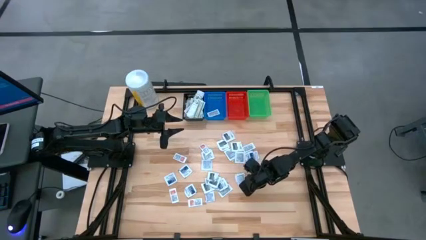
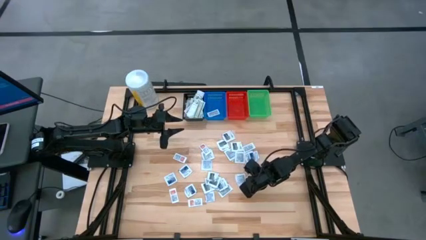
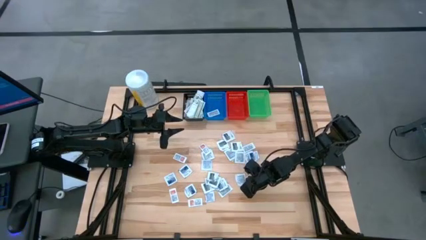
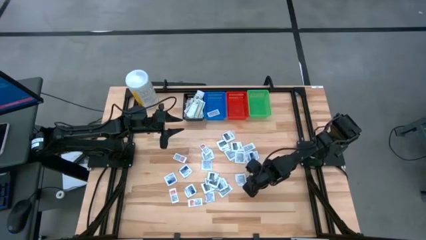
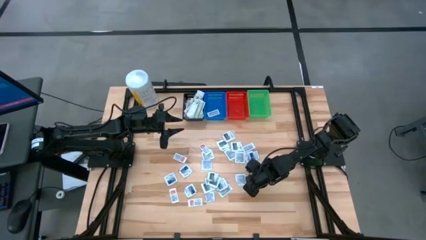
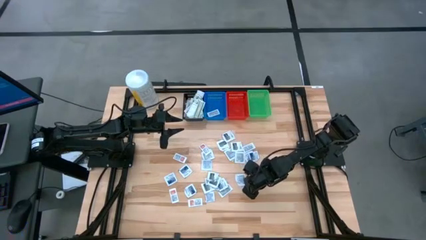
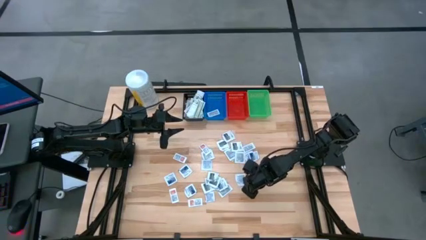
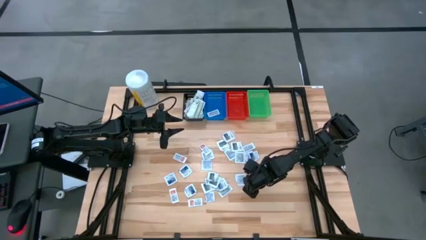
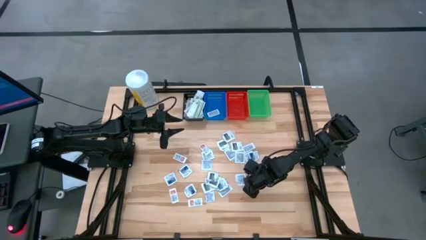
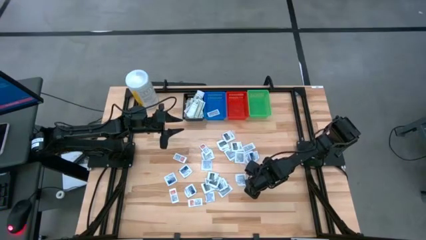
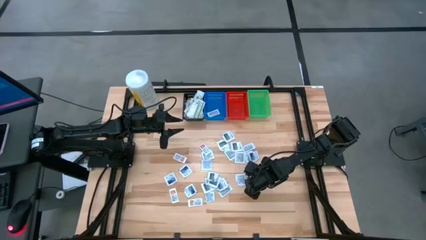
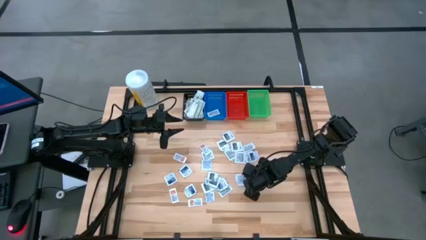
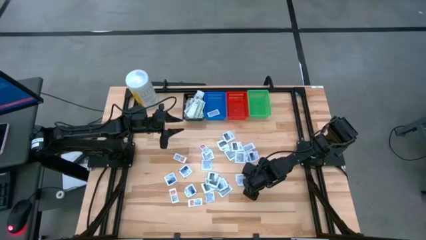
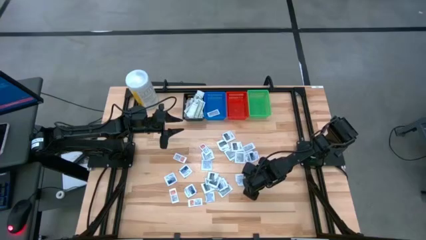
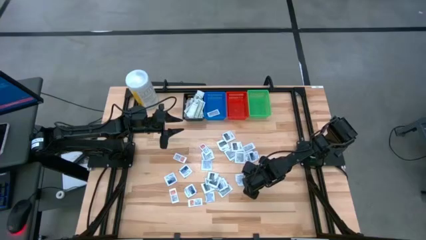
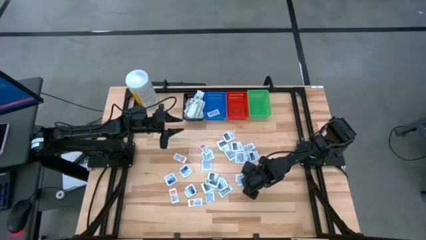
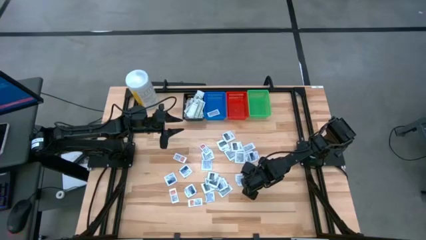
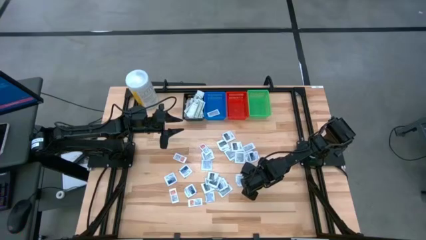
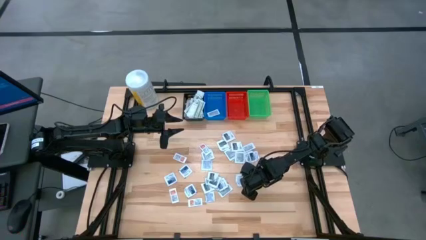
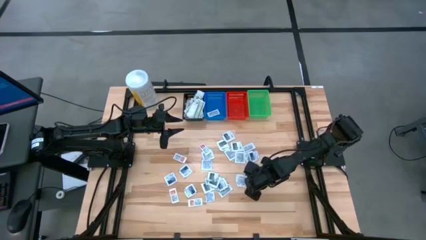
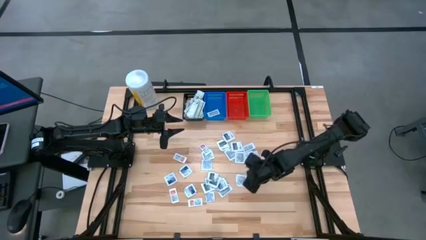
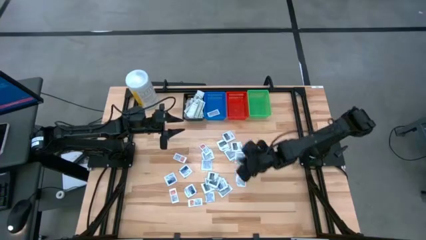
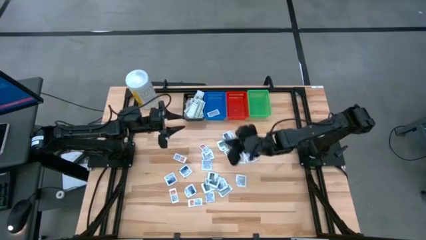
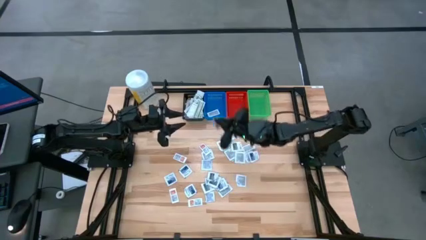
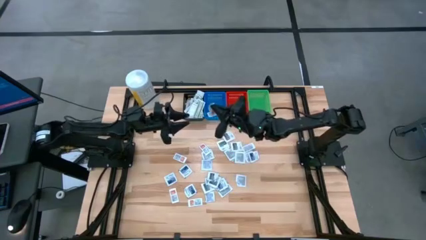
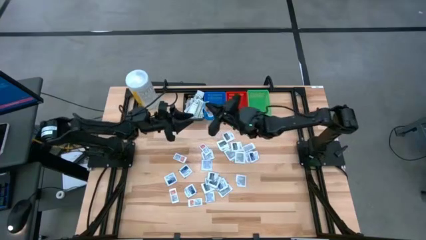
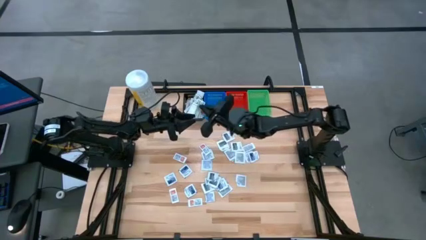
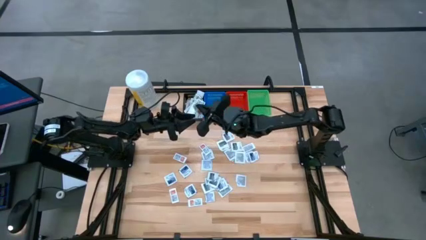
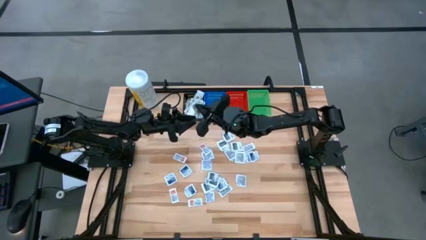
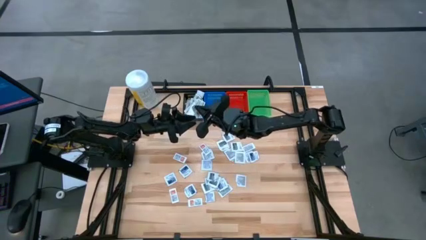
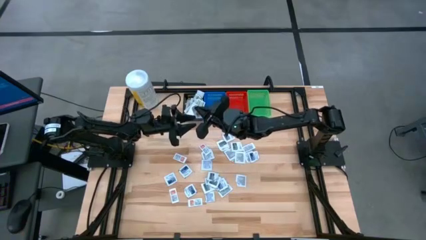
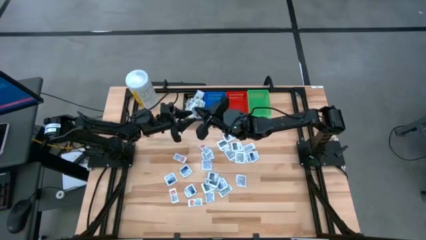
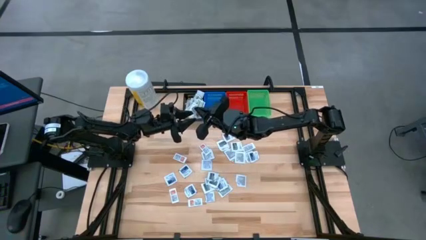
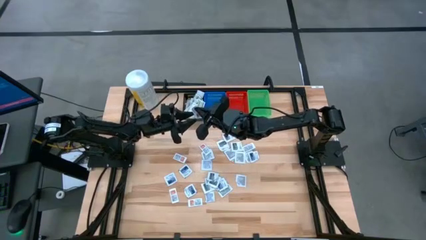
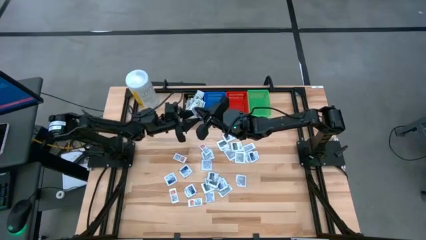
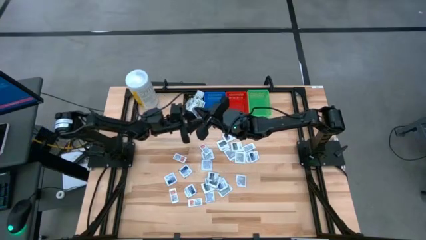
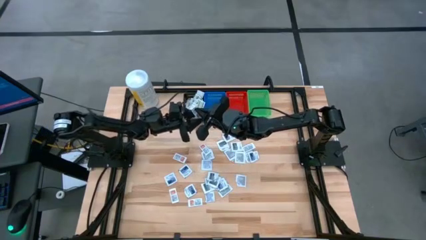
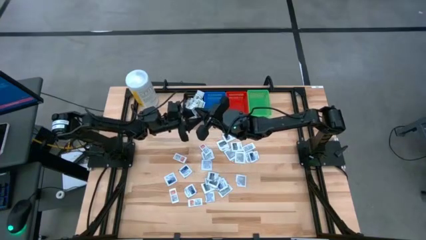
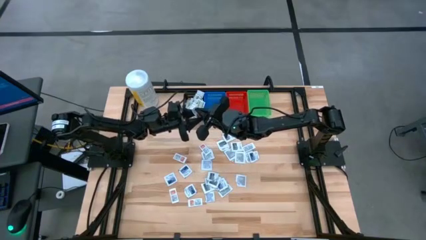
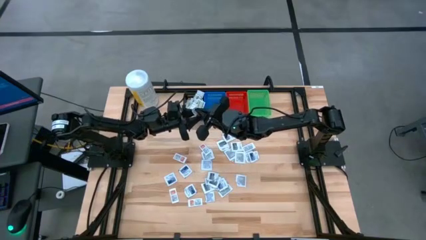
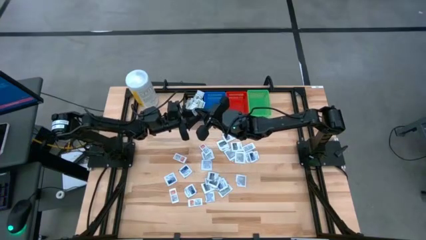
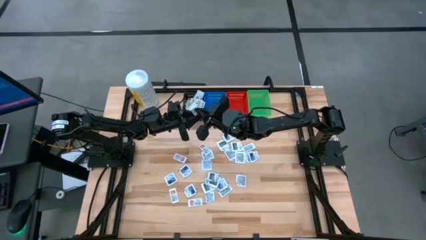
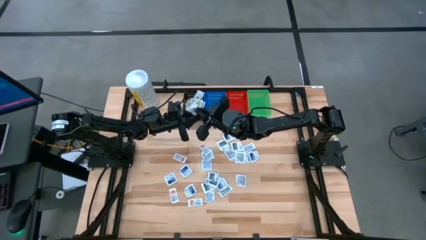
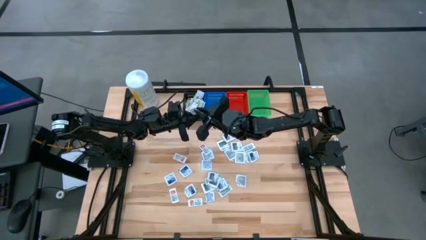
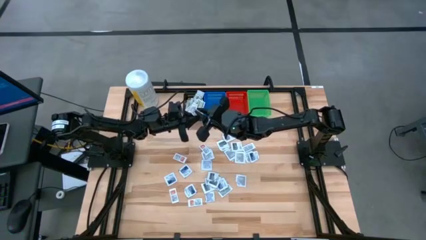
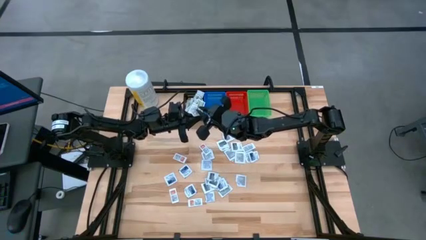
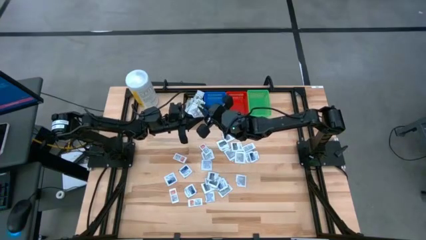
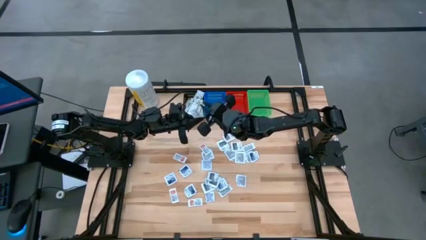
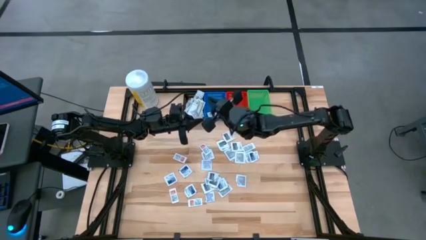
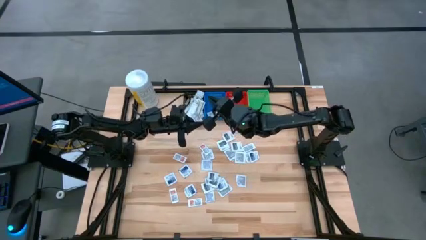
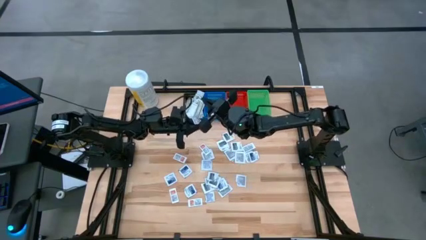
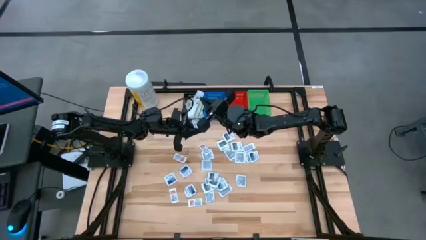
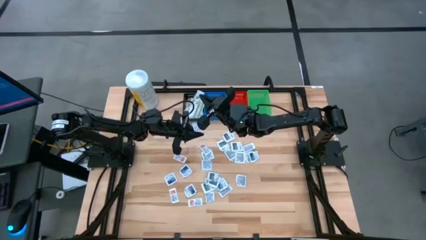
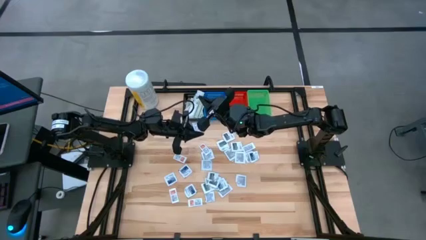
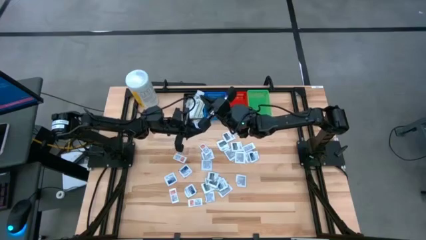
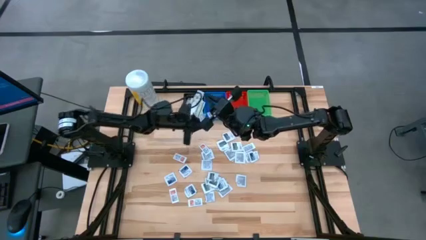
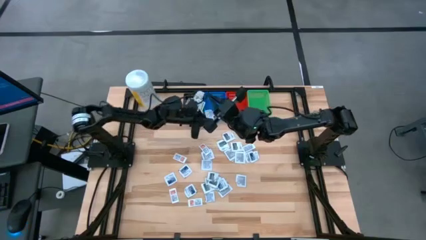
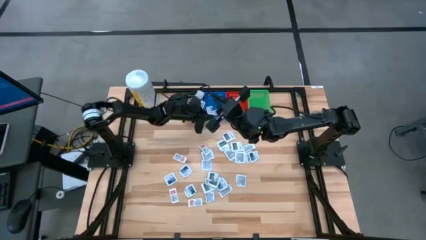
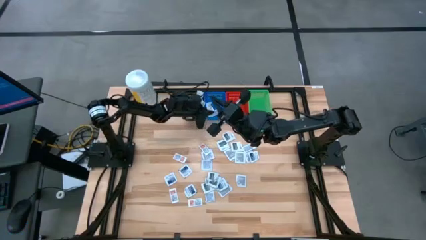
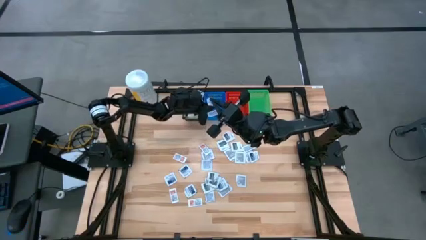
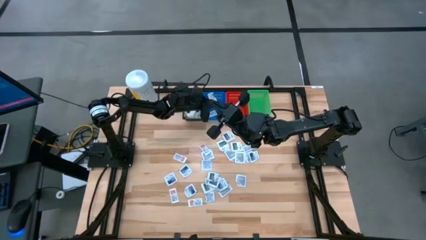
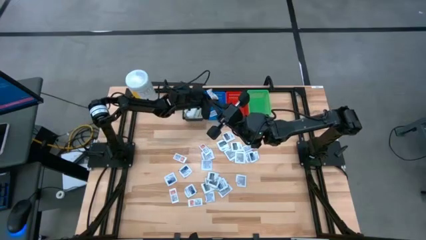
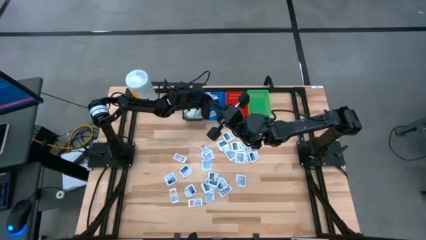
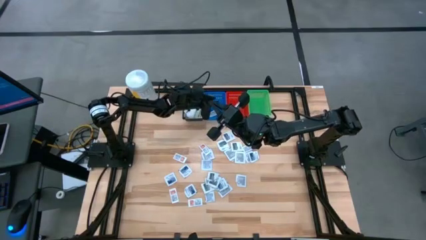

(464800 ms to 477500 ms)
Task: Pick & Place First Aid Supplies
Put the orange ointment pack in the blue bin

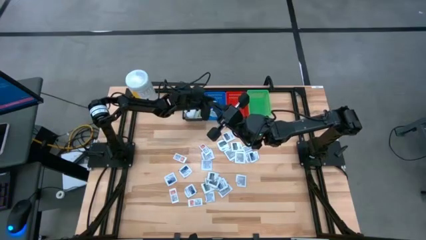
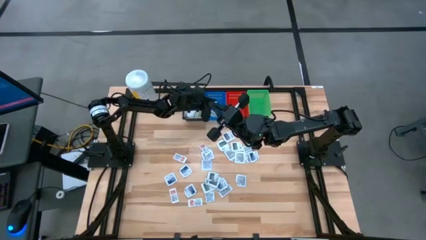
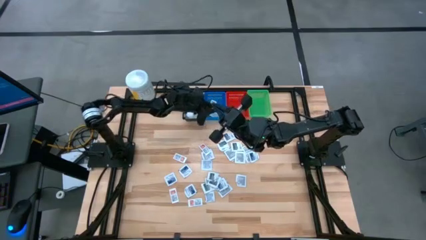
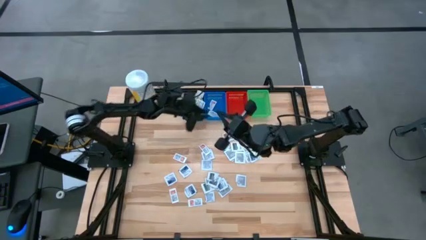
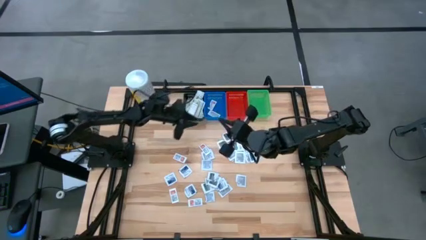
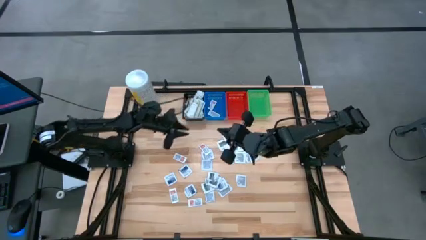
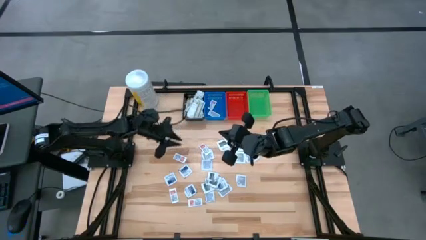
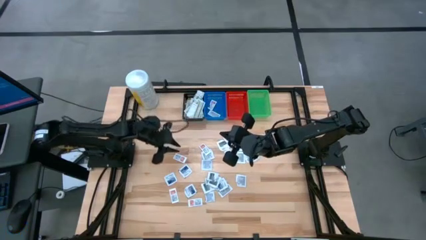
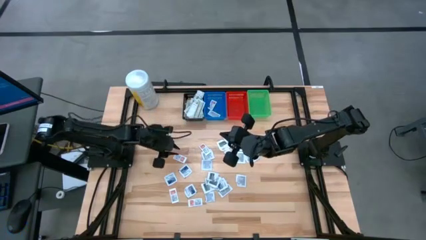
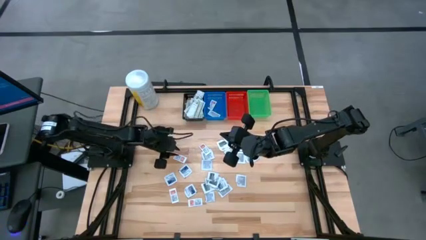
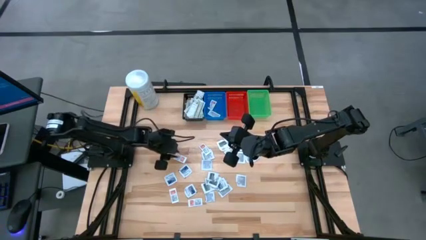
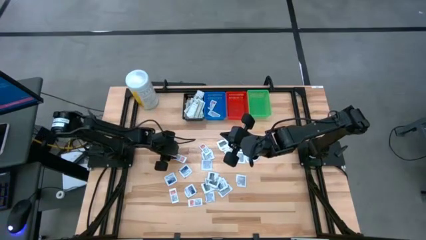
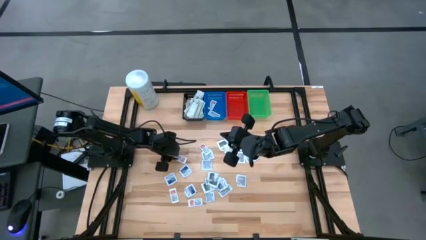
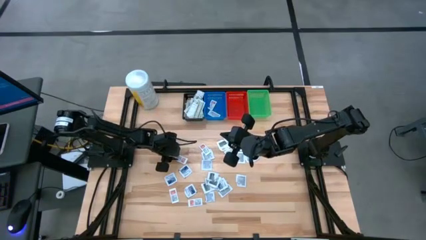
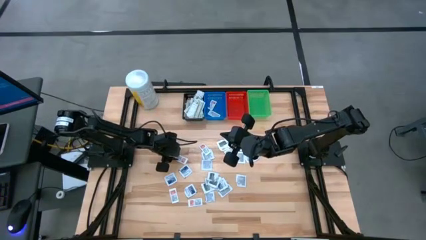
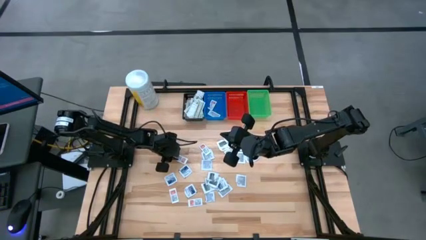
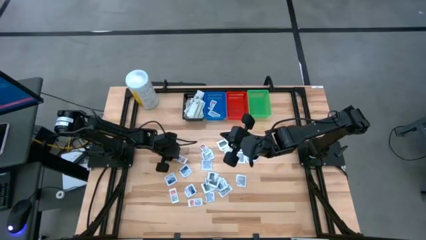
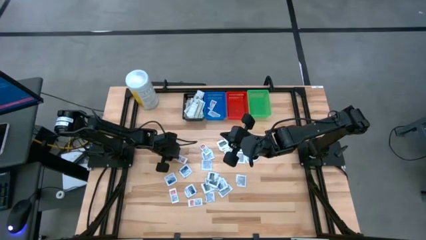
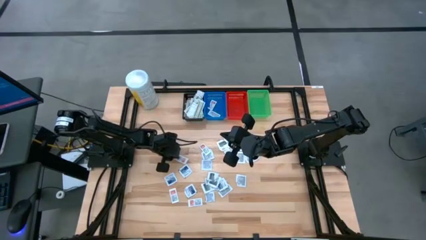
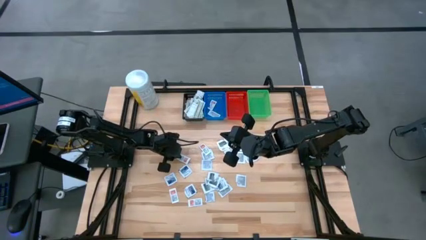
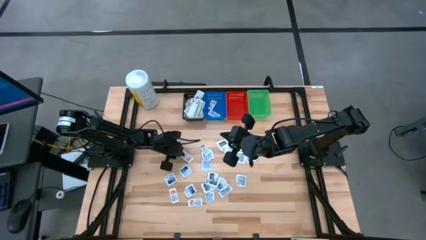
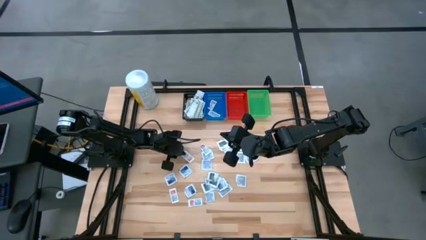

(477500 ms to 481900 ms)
Put the orange ointment pack in the blue bin
